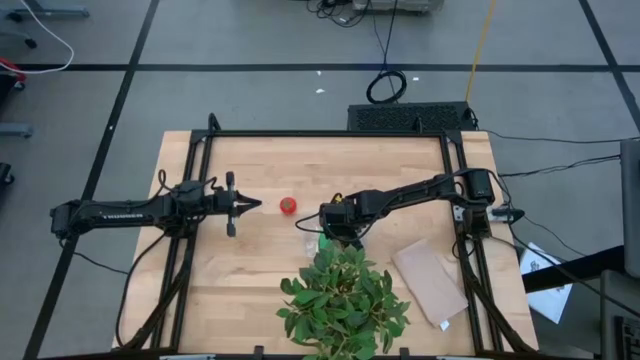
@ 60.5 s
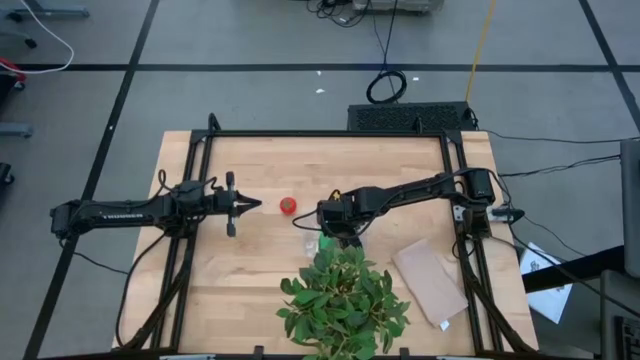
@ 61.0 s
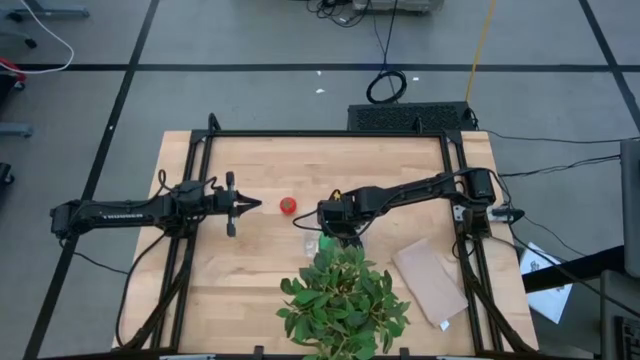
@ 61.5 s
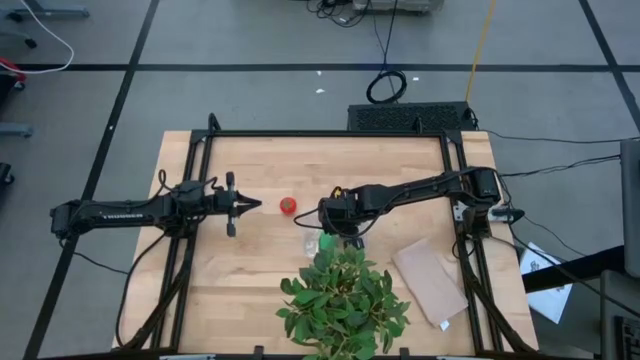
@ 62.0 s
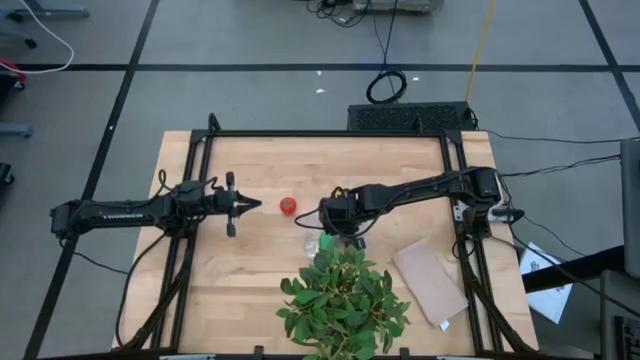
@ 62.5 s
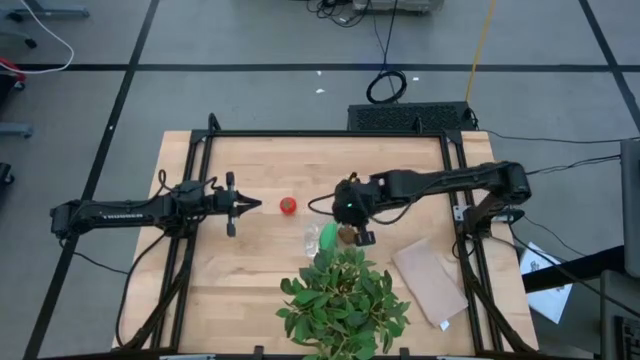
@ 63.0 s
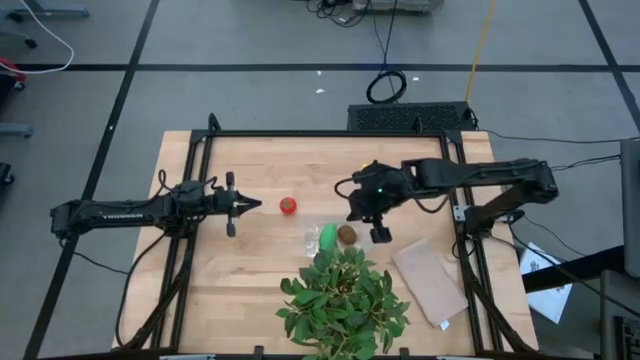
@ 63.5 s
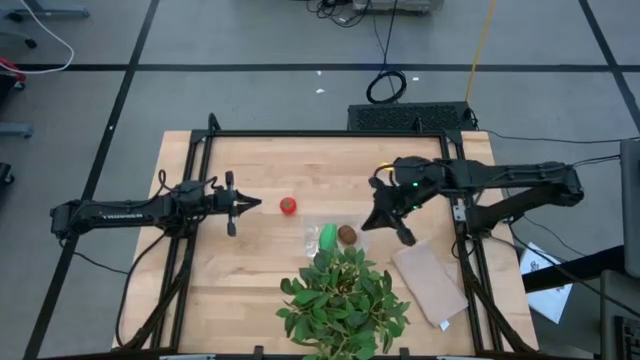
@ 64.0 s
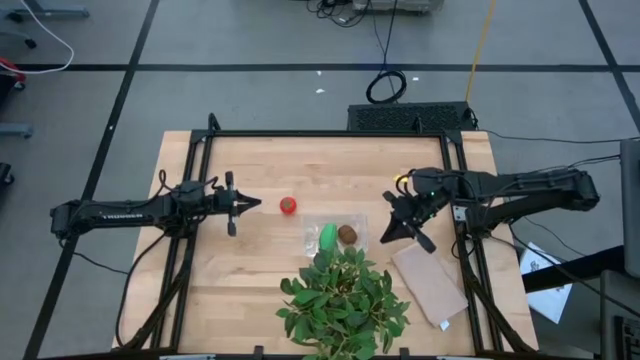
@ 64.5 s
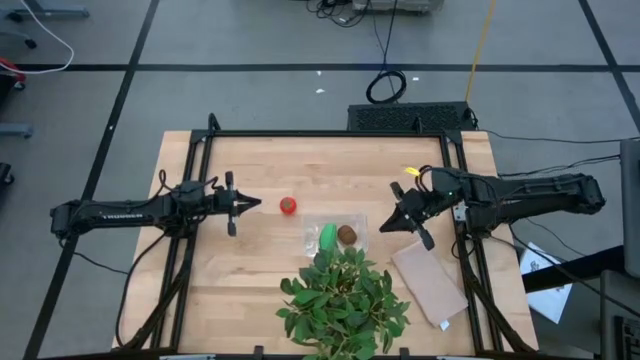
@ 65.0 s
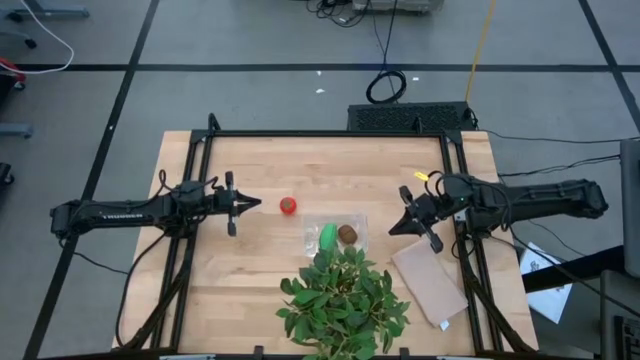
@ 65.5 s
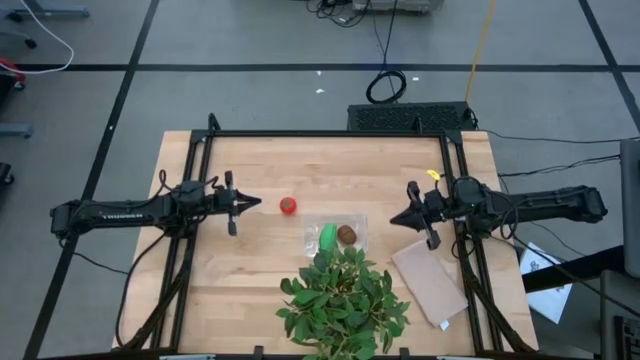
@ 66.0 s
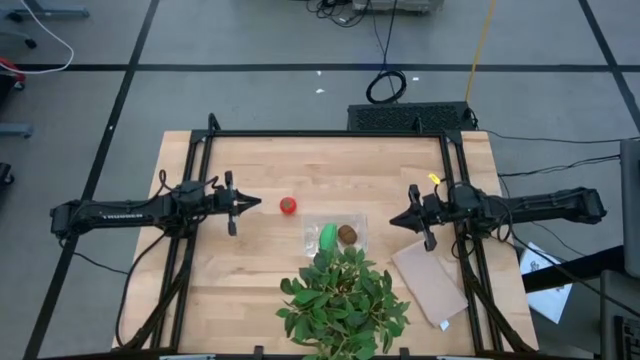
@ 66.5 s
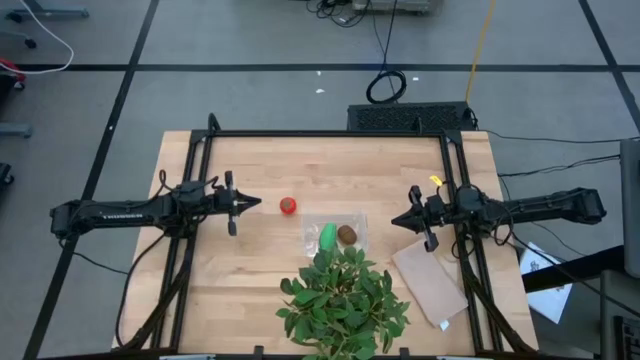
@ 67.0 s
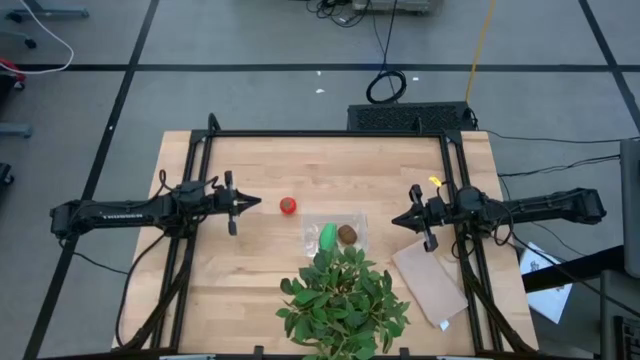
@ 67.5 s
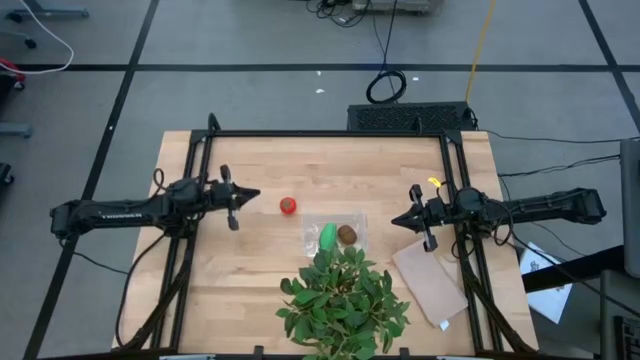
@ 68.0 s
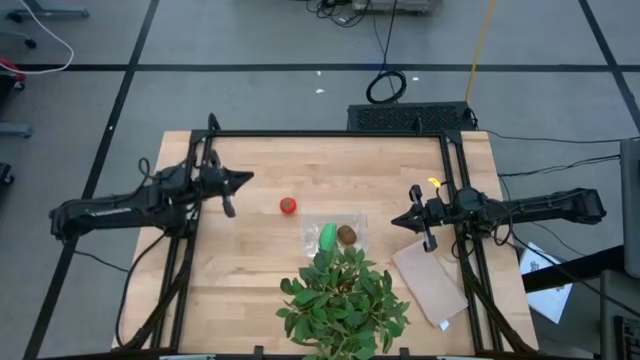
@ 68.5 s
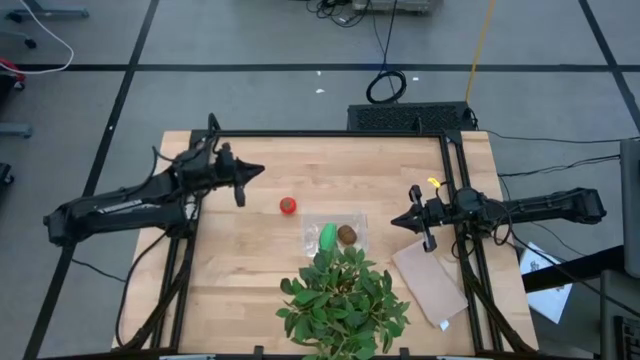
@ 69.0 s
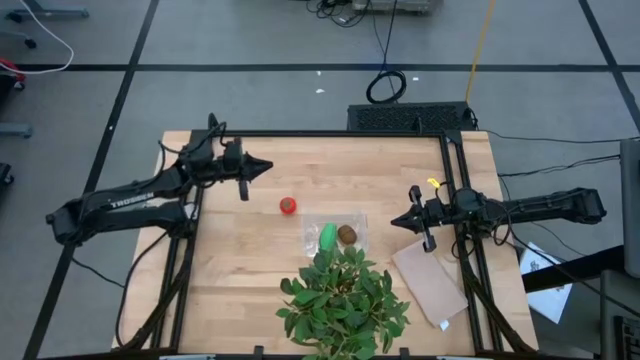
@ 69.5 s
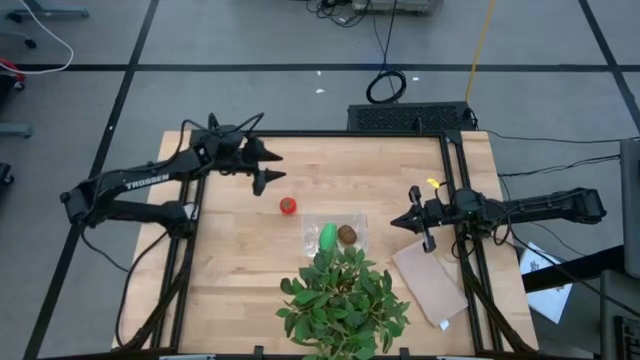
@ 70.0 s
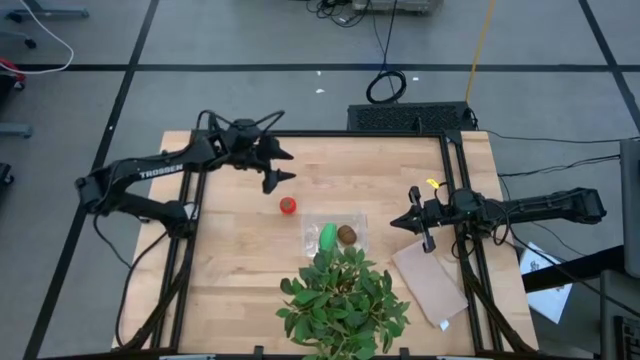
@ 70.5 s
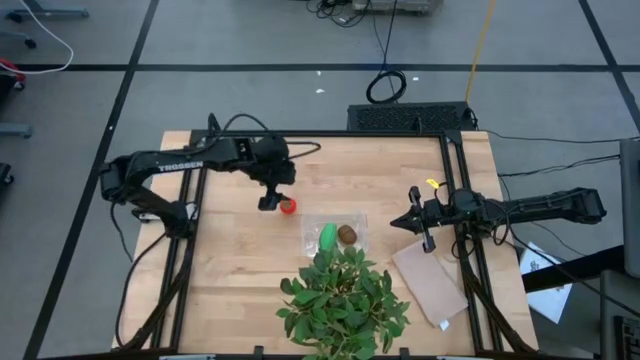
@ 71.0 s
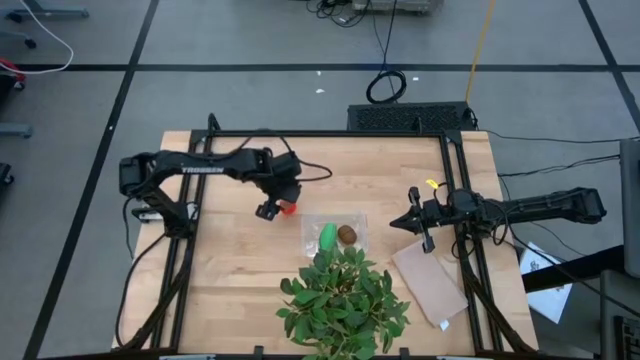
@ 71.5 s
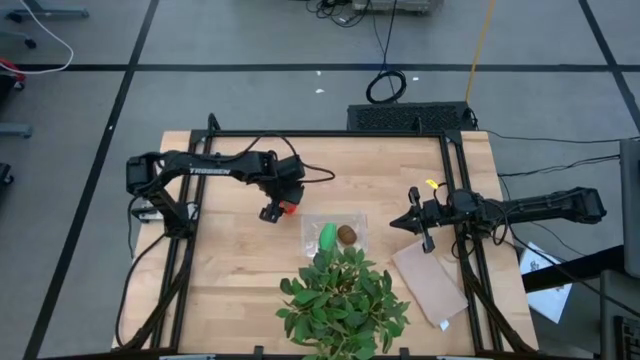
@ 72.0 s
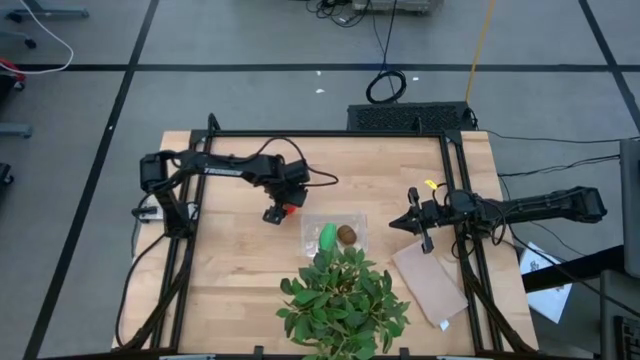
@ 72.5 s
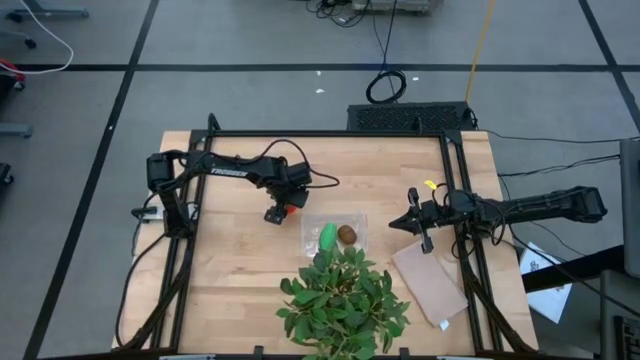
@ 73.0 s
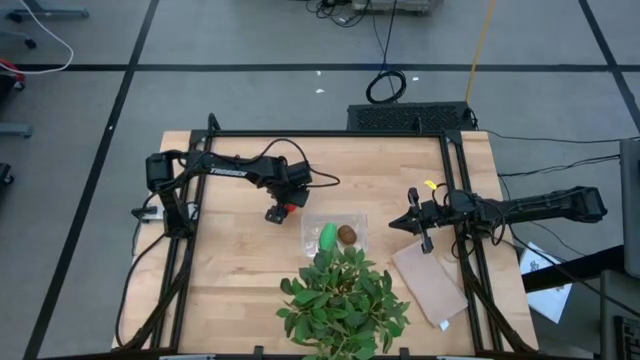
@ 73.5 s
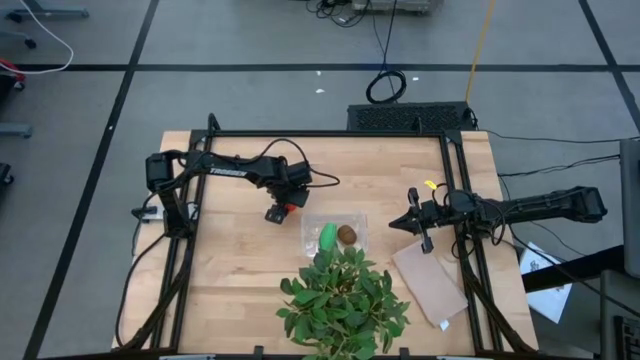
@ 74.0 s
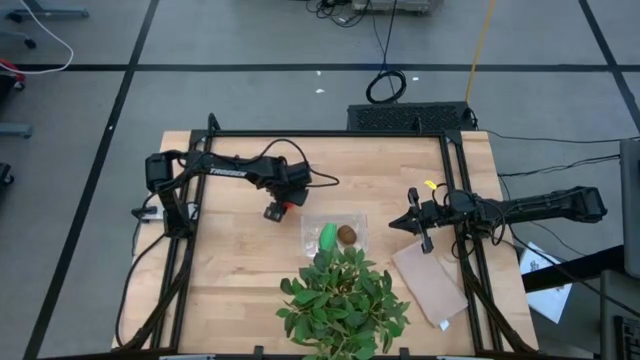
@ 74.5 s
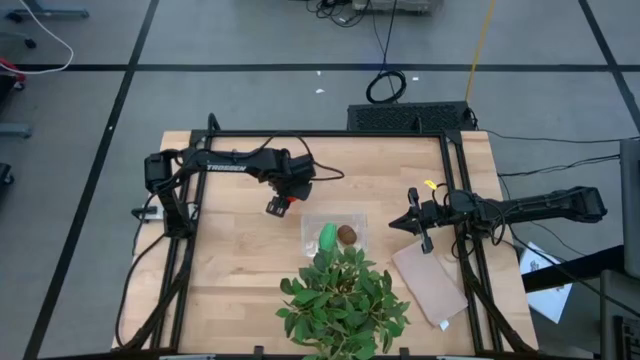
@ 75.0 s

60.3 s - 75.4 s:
Task: Pick and placing Produce into tupperware
Put the orange tomato into the transparent bin

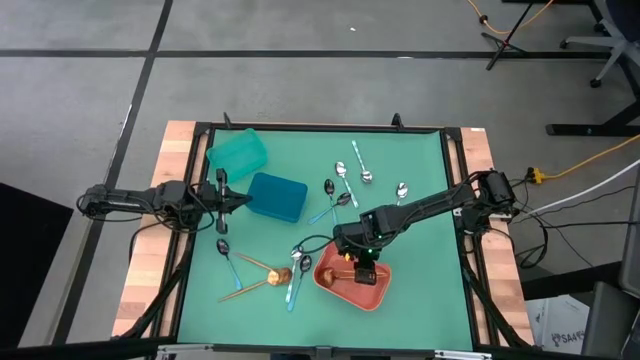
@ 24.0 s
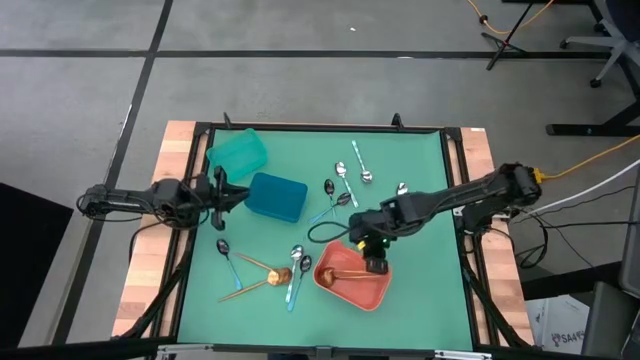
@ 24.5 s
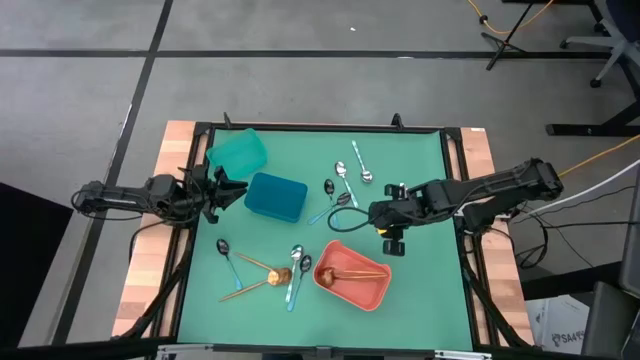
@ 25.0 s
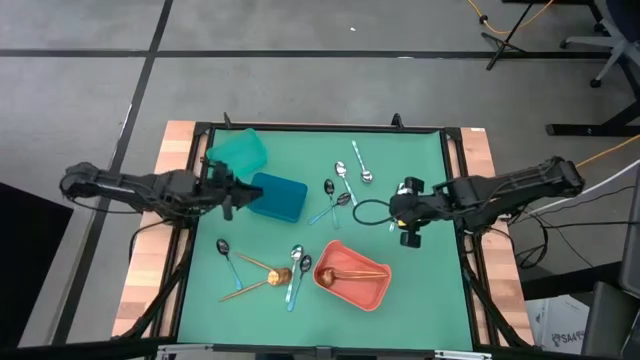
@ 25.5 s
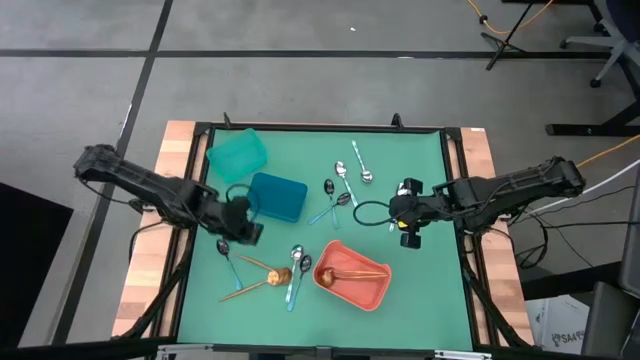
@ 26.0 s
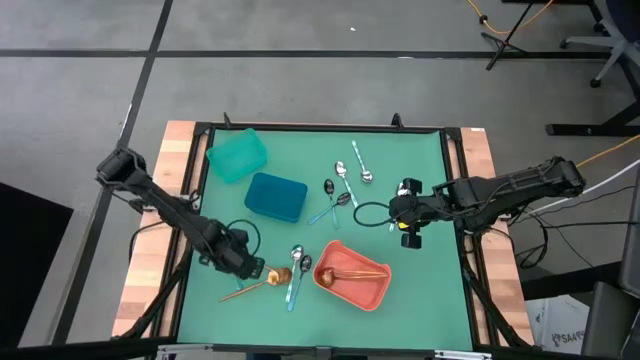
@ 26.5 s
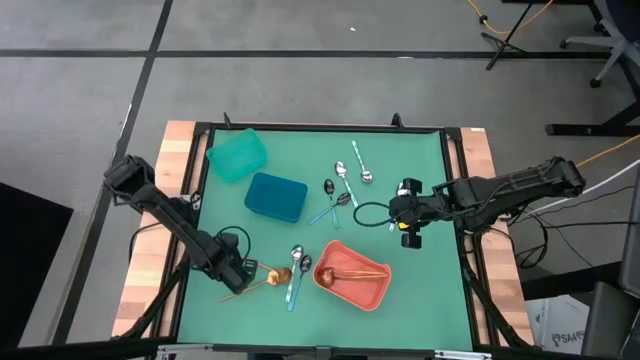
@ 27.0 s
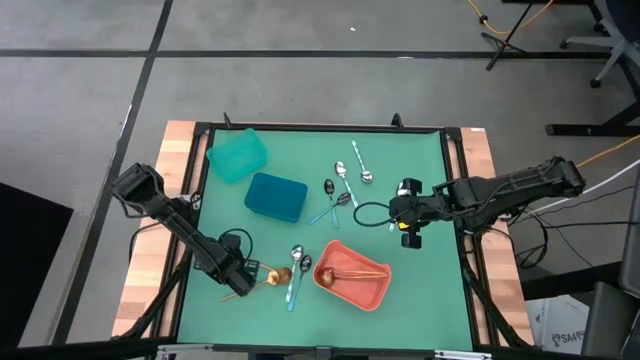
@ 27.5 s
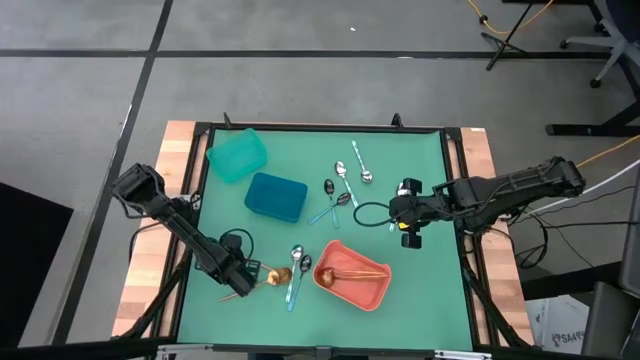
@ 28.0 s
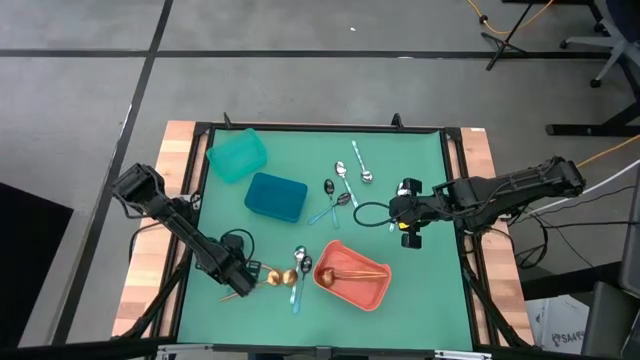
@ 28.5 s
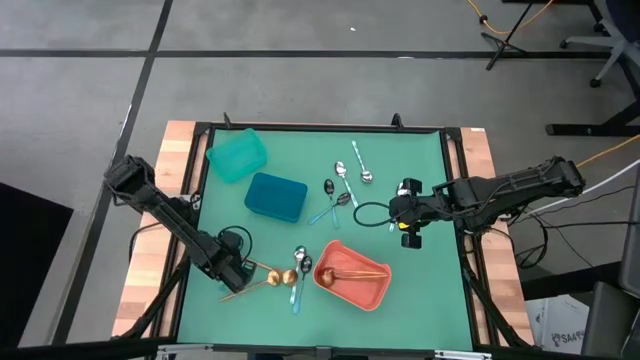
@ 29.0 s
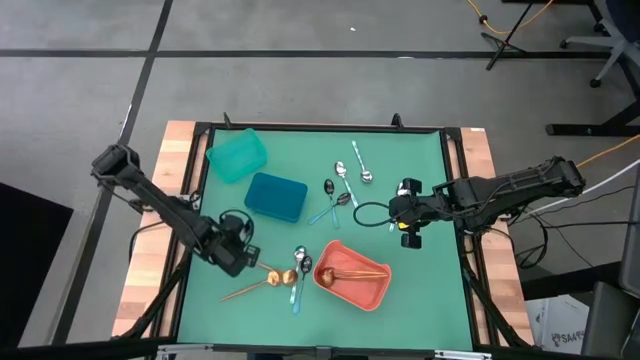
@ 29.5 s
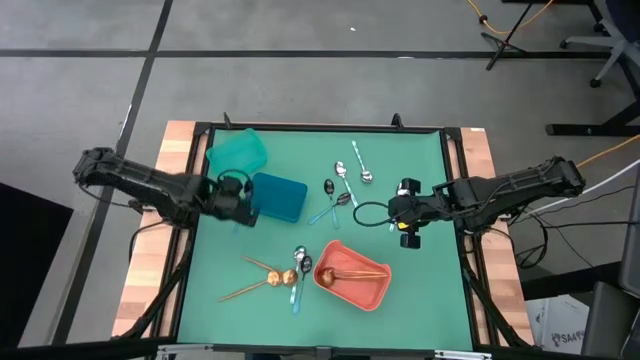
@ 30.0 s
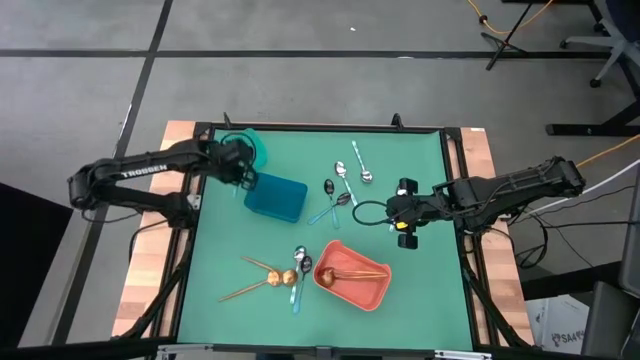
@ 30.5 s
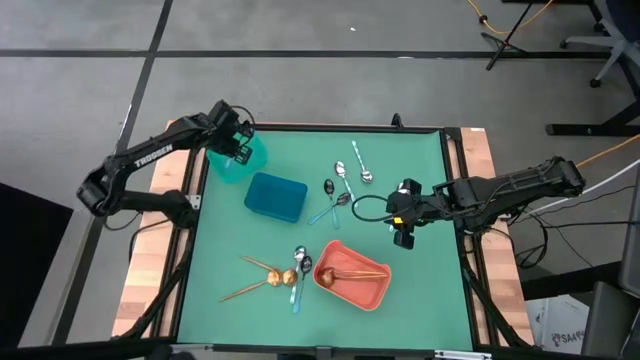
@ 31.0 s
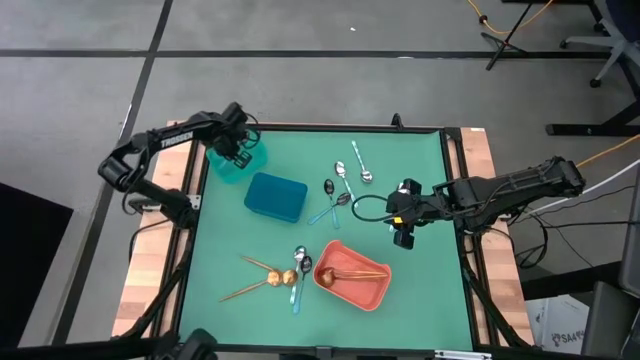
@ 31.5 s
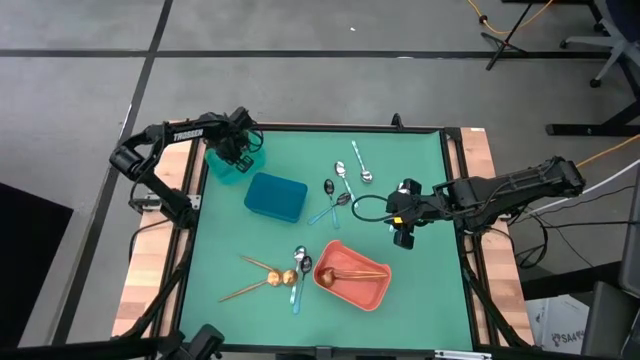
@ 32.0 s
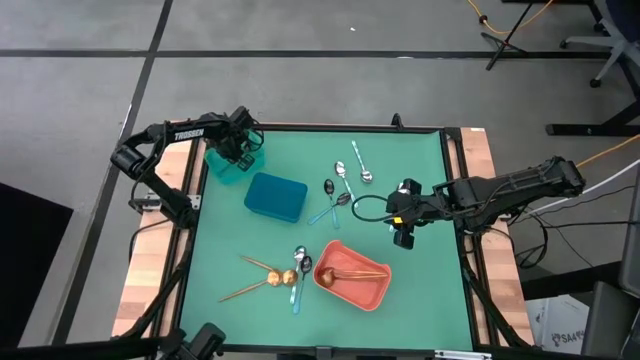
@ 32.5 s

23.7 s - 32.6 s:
Task: Sort silverware by color (type)
Put the blue spoon into the transparent green bin
